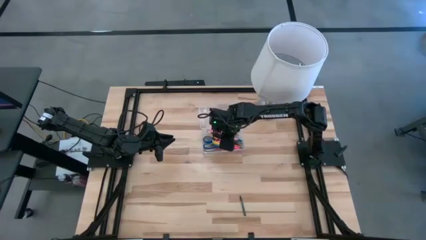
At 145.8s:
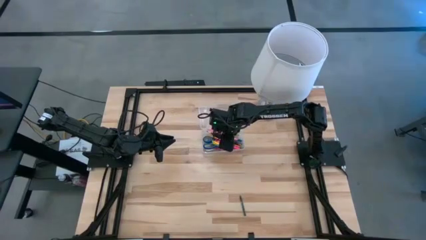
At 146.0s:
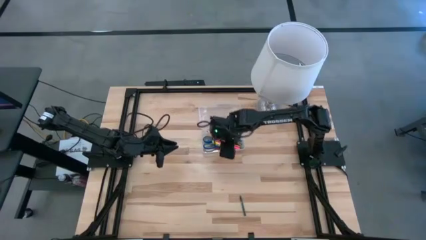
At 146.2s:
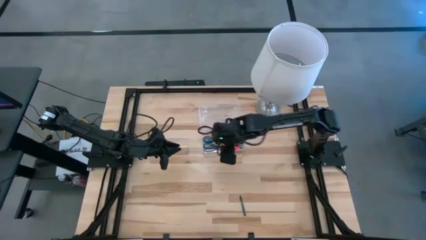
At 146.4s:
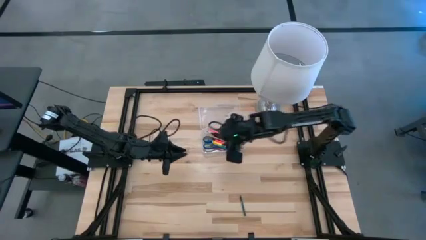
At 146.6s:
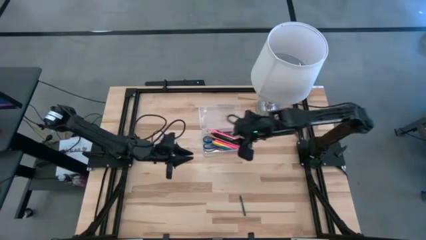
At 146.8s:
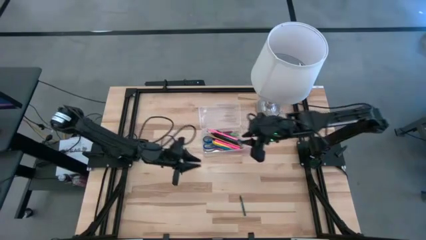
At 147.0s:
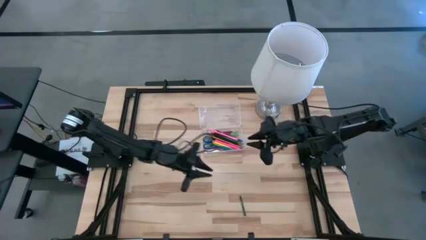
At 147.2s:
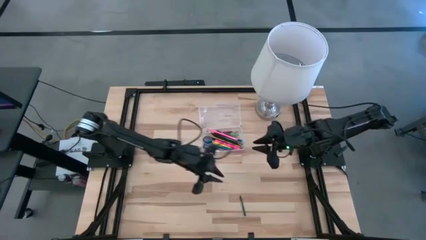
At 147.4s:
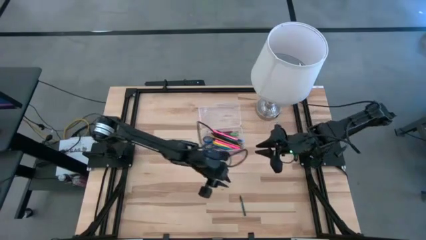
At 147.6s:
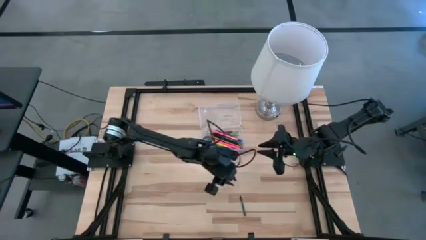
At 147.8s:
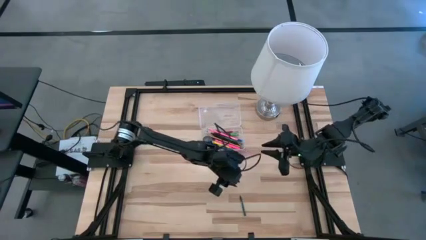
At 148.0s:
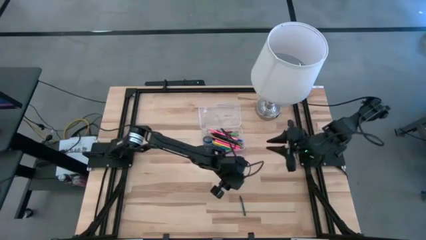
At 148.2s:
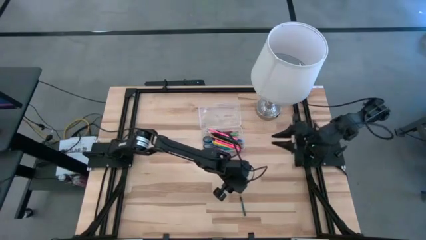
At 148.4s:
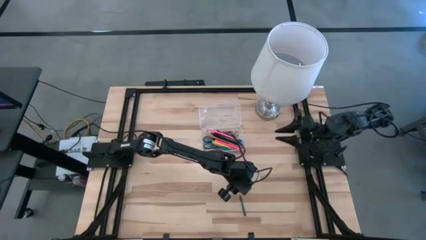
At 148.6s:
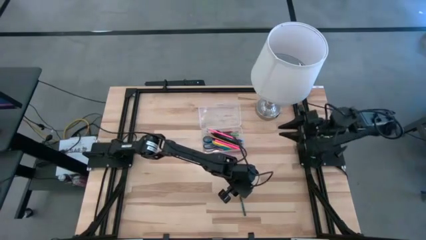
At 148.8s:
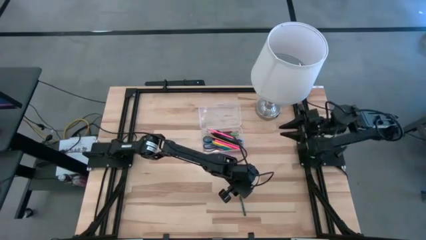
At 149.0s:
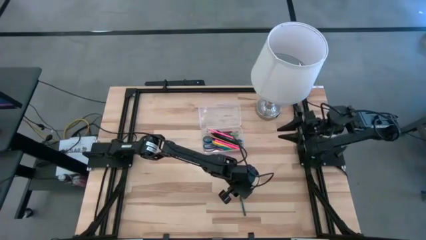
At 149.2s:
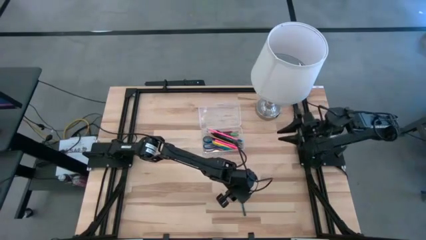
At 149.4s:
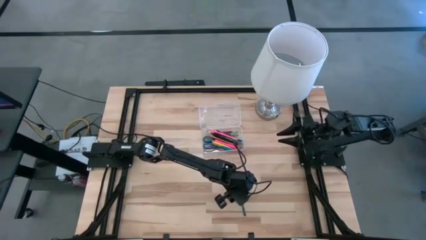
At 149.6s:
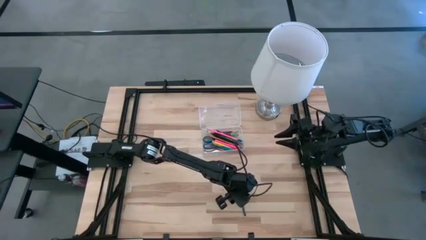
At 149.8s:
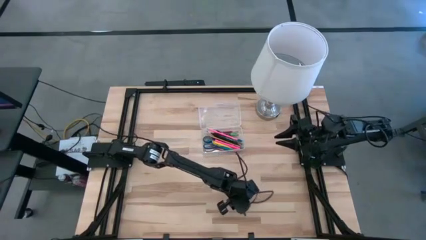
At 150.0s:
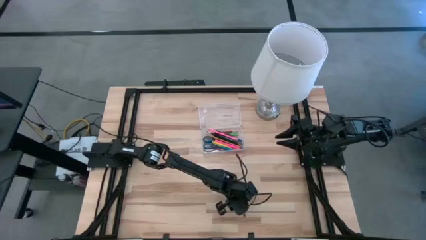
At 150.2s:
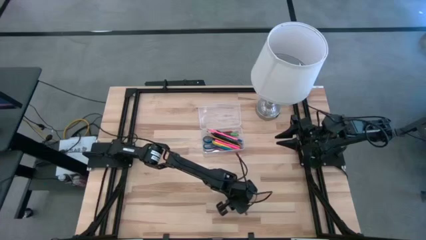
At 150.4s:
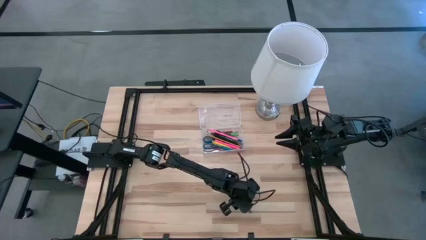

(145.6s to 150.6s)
Task: Pick & place school supplies into a supply box
Put the green crayon into the transparent supply box

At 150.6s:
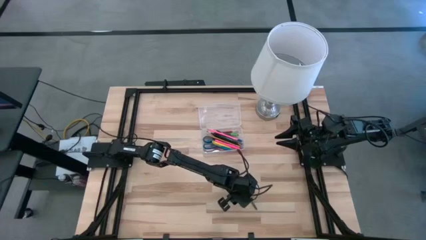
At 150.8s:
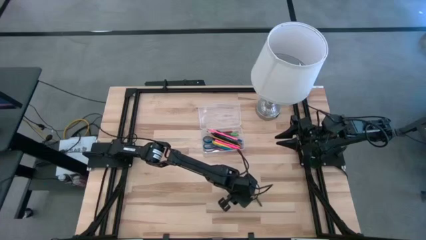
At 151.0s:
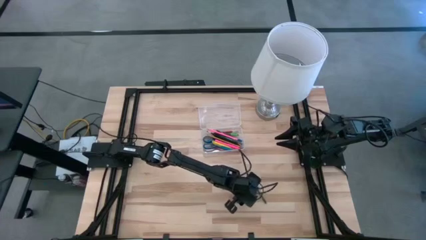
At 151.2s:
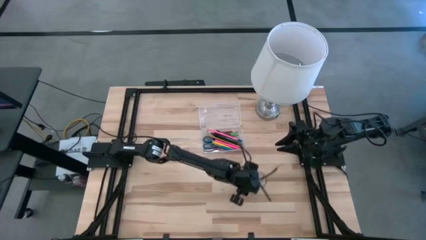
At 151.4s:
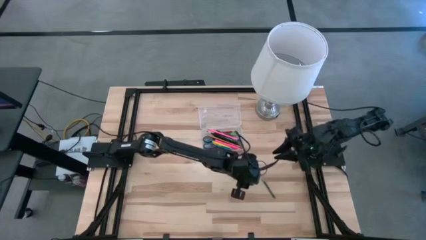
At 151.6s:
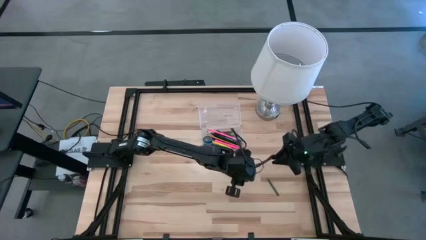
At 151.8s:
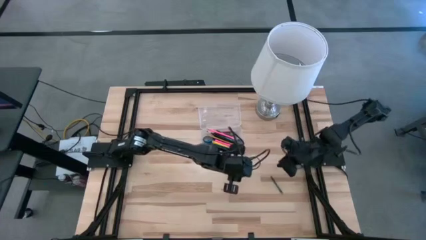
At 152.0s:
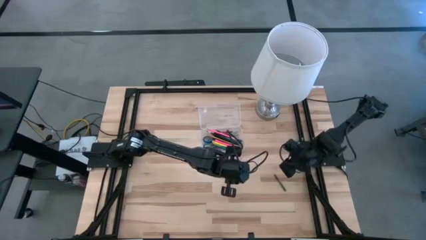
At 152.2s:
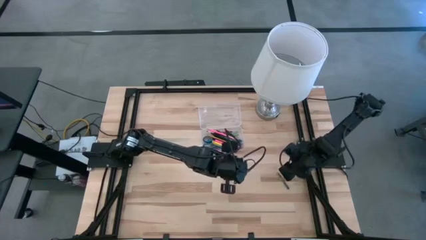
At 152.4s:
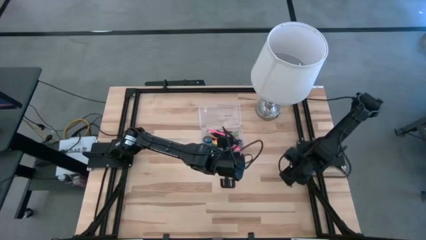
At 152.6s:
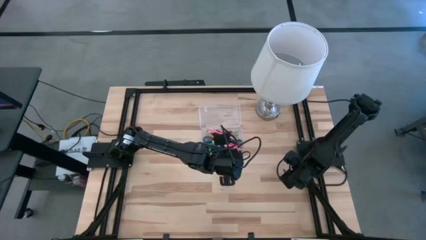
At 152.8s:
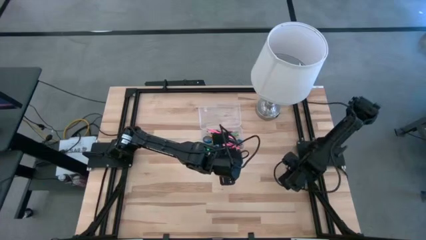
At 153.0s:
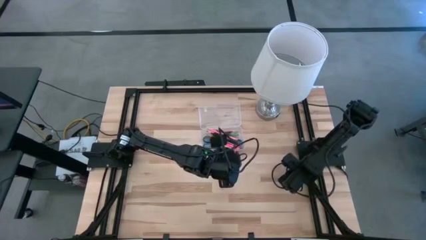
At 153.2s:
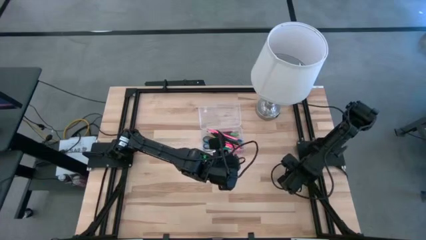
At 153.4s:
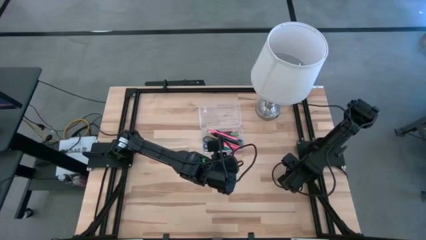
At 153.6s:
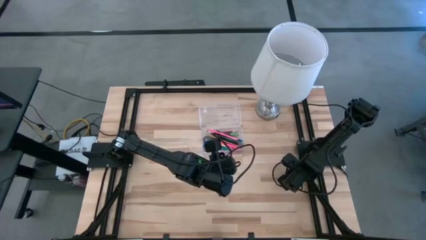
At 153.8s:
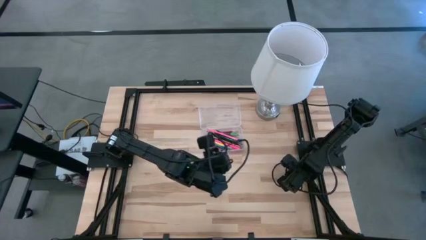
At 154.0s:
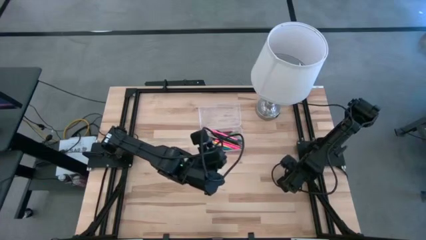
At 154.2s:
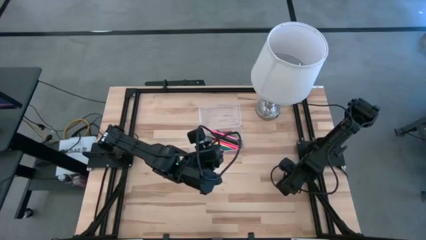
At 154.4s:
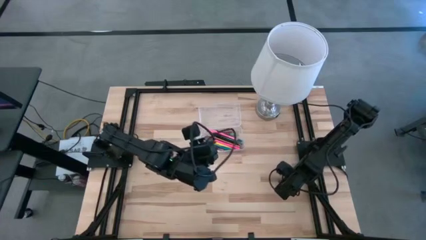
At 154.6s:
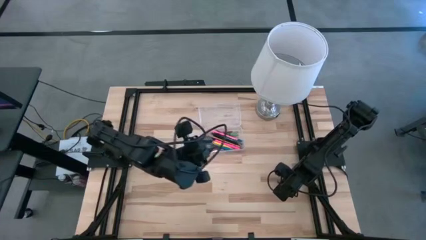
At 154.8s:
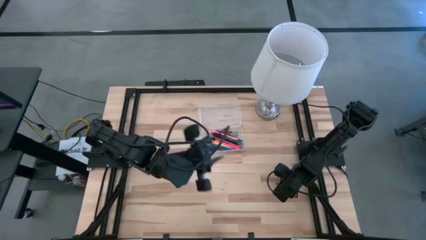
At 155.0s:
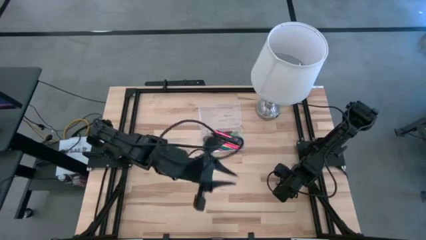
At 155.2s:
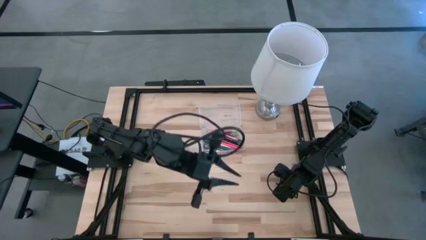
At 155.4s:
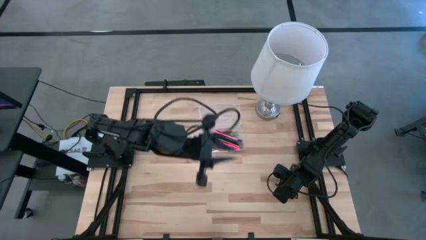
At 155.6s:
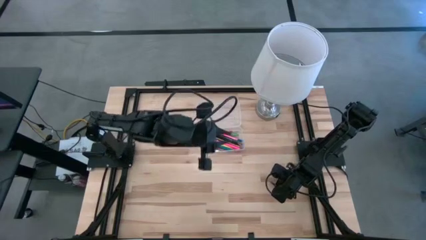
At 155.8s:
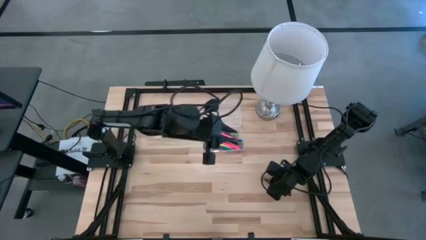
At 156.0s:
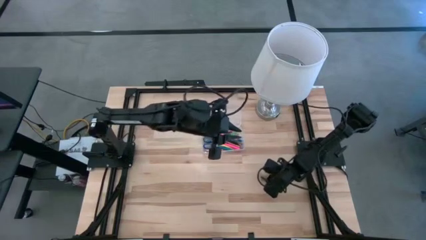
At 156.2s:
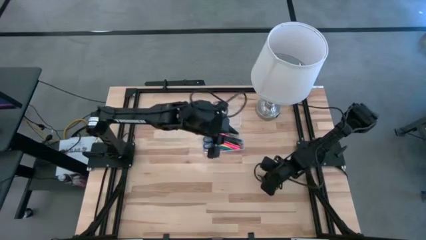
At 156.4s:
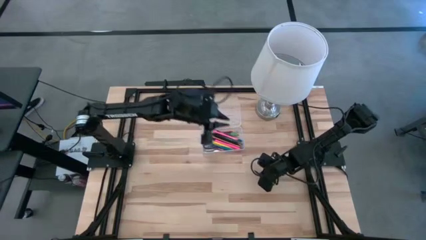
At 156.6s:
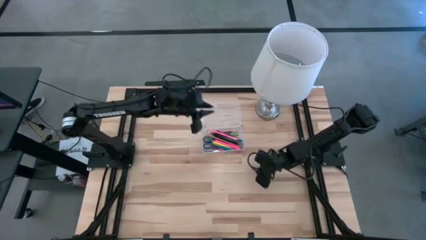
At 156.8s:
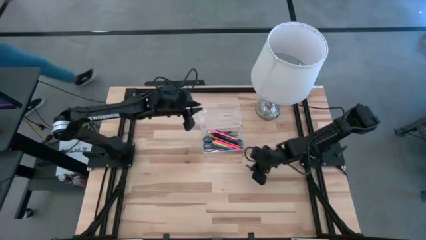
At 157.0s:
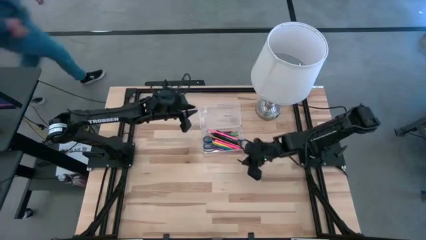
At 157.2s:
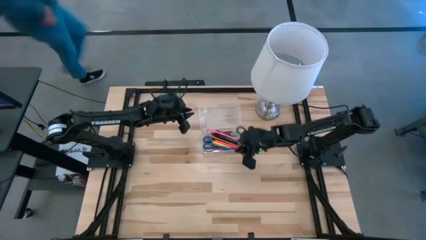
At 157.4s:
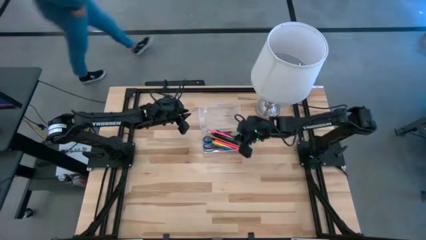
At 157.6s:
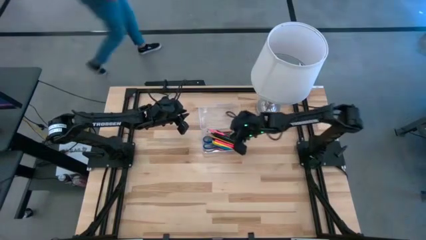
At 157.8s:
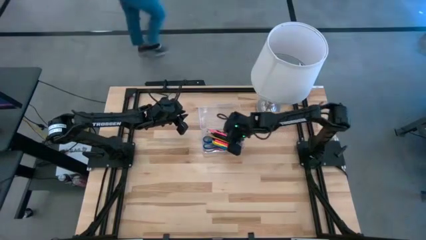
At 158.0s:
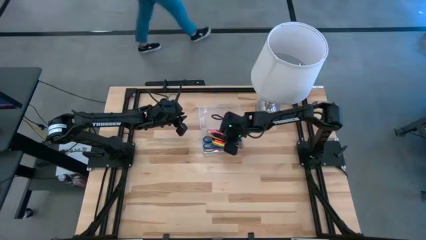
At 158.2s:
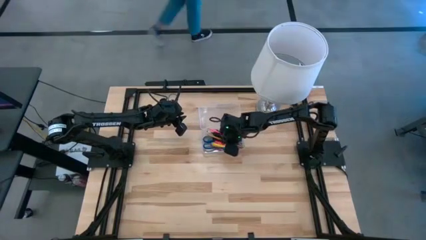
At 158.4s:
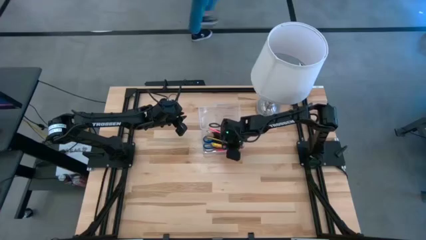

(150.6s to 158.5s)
Put the green crayon into the transparent supply box

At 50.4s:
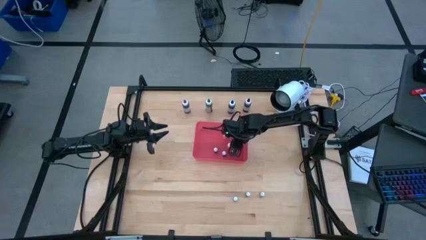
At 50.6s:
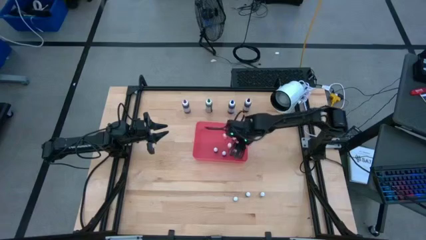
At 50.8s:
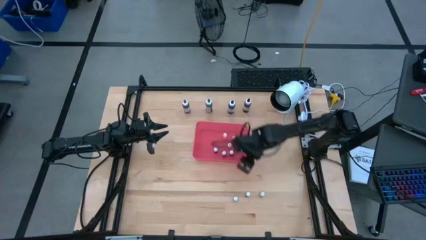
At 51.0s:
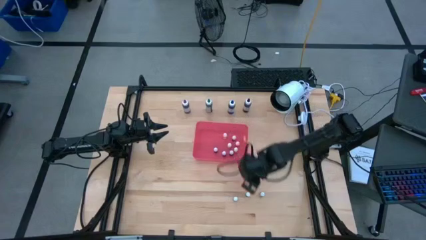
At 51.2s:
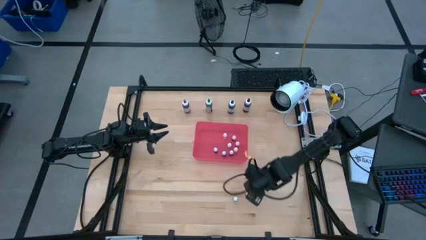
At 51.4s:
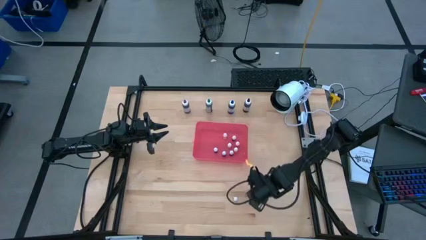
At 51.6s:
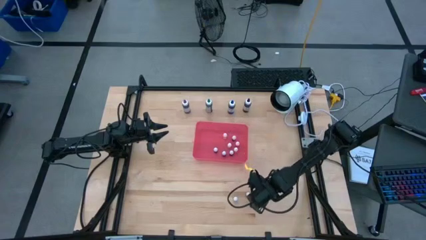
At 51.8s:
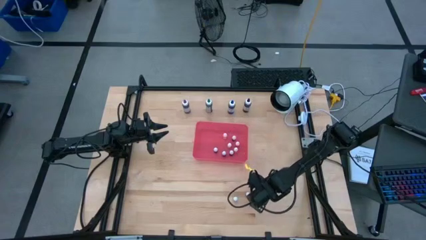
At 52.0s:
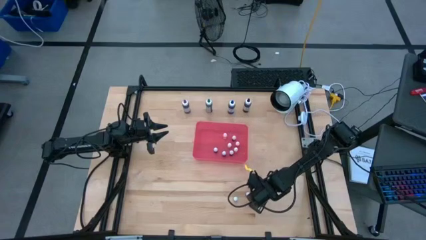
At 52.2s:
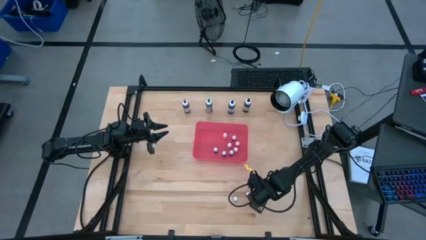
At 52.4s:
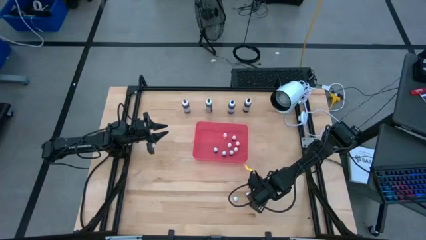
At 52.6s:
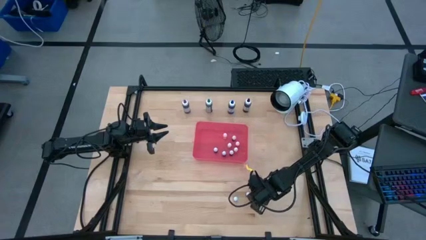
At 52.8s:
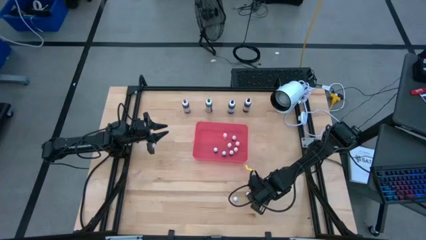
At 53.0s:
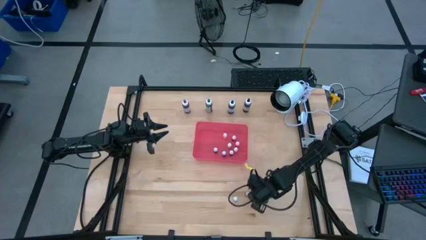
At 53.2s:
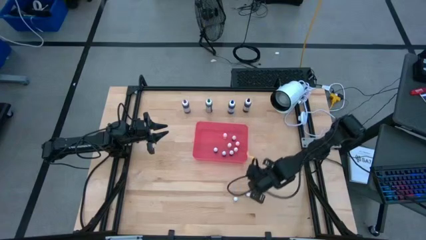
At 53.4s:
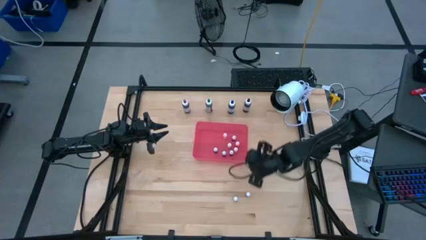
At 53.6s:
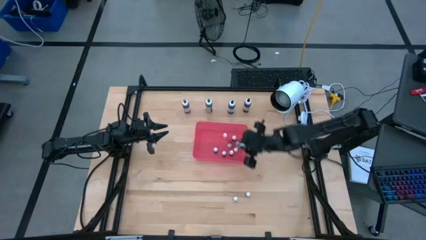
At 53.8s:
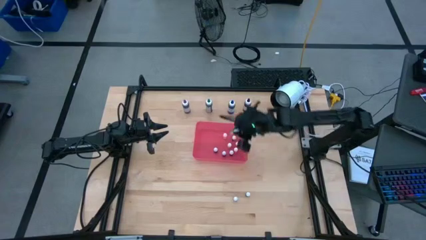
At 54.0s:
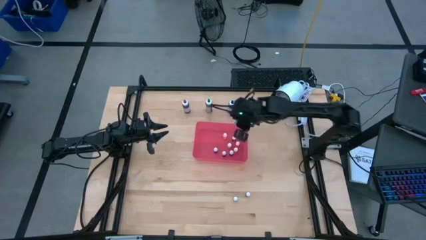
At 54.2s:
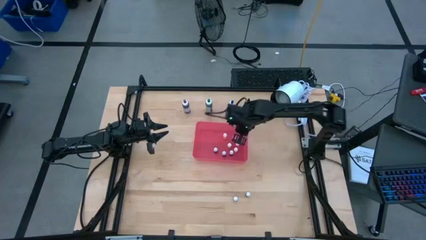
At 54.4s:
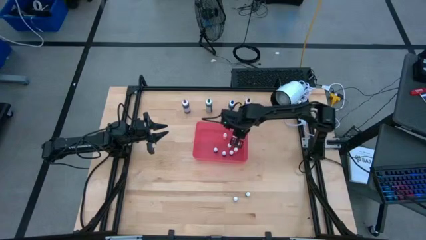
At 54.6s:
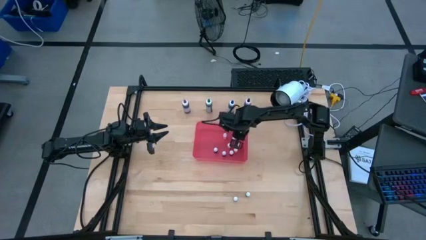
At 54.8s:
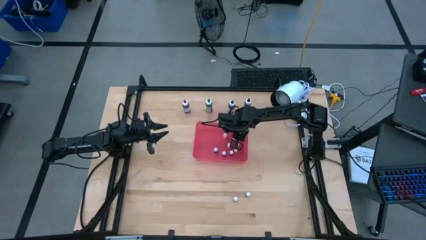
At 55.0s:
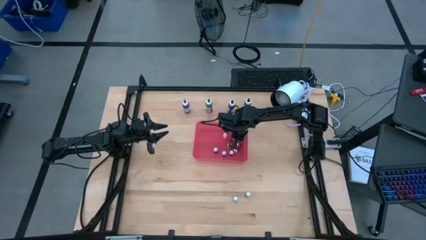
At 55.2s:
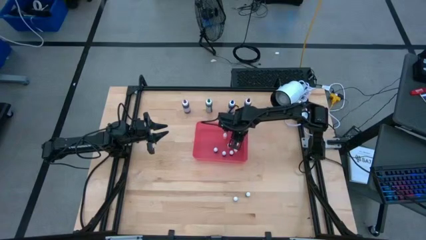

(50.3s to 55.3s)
Task: Pick & Place food coloring
Put the small green food coloring bottle into the red bin
